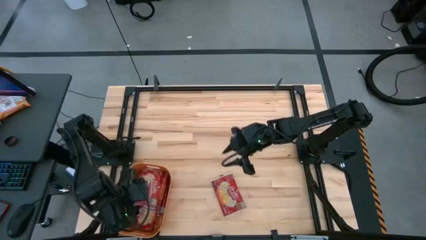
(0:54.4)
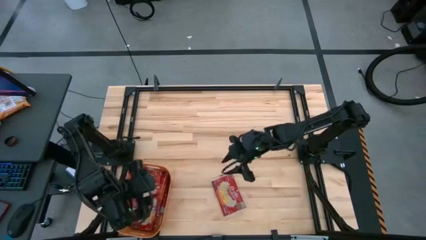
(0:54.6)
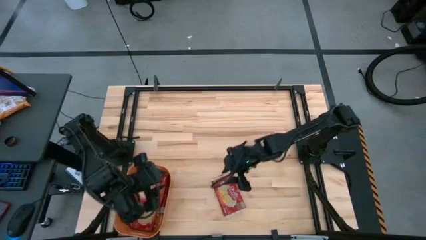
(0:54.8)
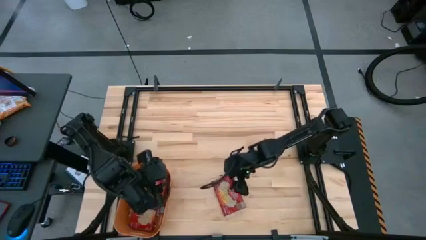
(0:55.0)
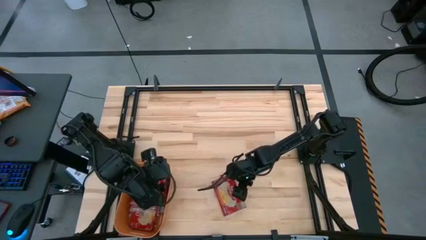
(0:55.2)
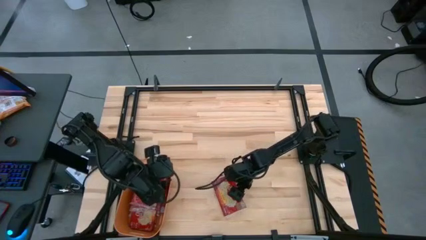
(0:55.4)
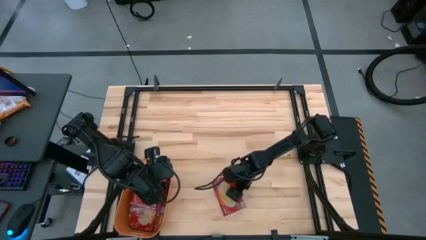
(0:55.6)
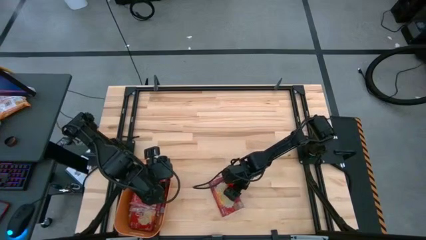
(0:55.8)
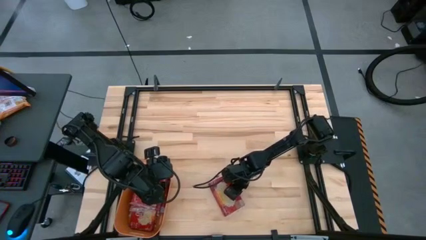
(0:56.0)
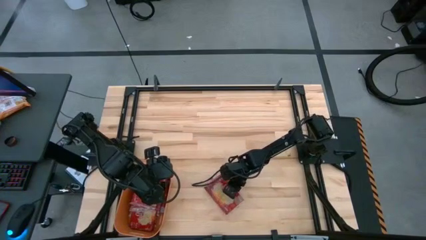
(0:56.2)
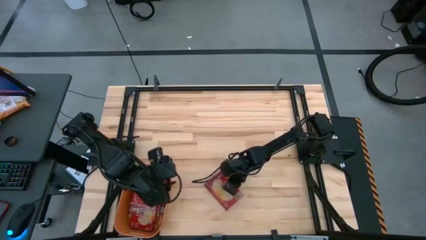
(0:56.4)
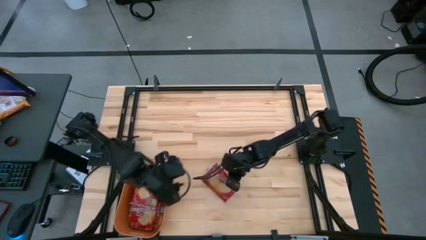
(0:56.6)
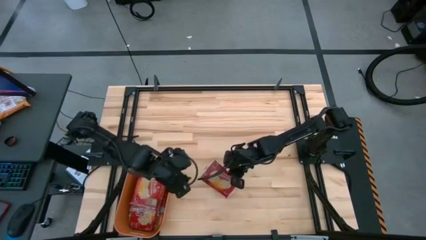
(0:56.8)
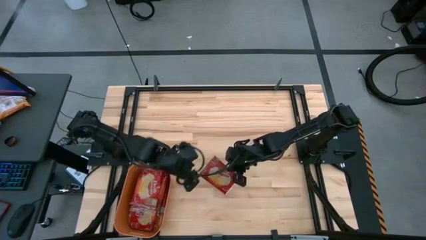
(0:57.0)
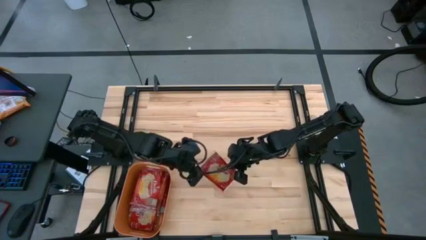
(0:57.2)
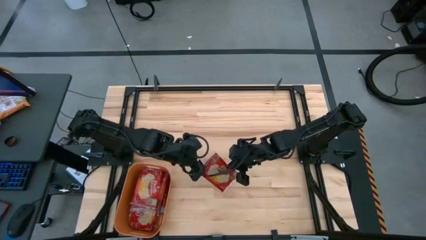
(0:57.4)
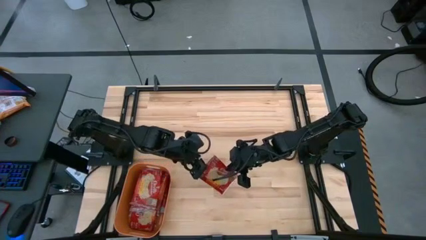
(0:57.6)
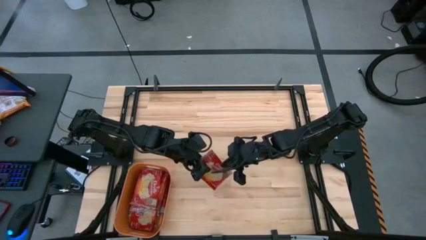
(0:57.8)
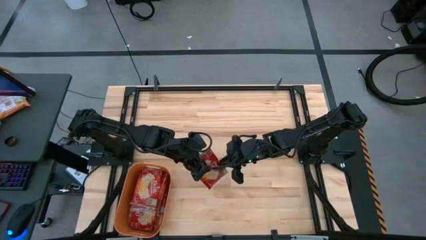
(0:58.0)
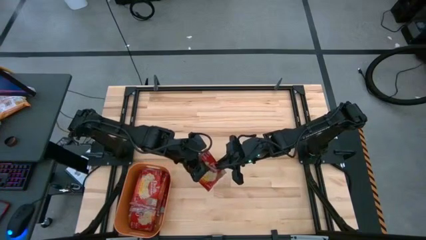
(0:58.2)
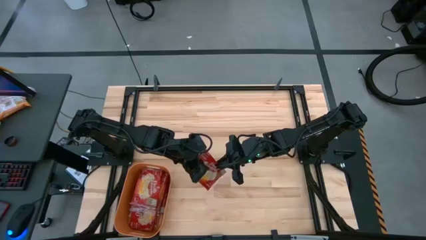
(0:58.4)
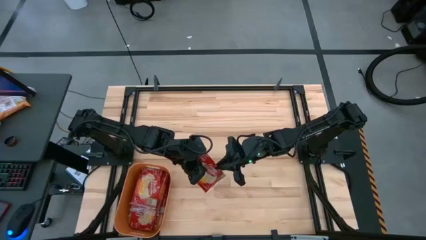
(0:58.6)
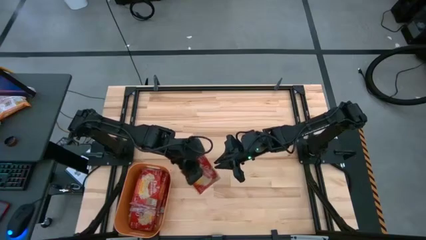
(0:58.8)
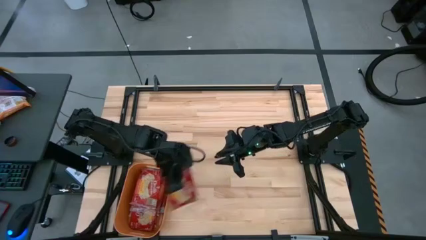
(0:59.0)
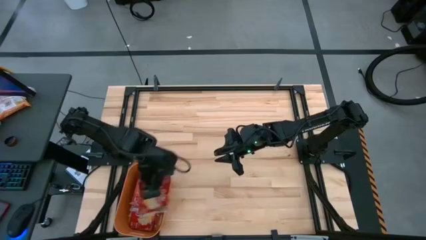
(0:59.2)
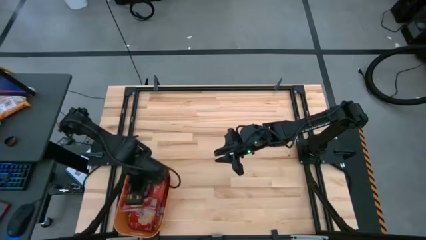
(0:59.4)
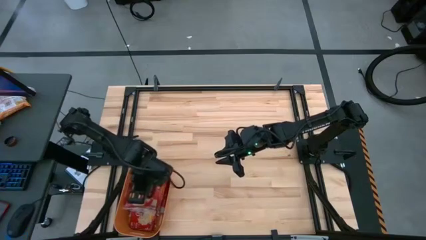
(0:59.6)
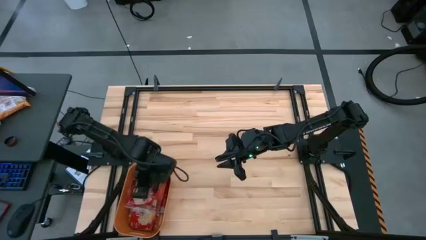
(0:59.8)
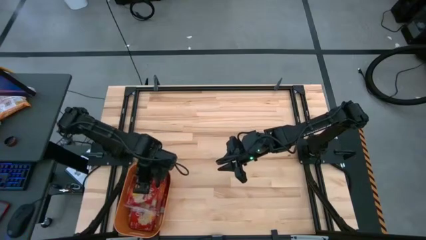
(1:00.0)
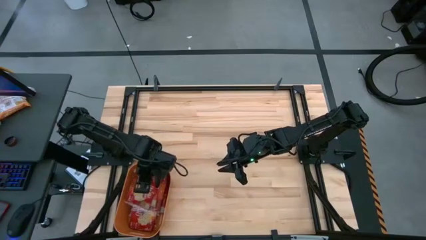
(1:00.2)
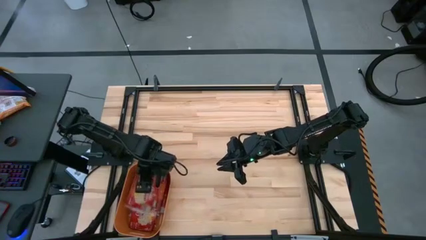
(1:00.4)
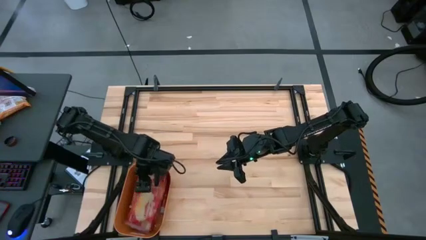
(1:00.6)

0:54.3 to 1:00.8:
Task: Sort popcorn bags into baskets
Put the red popcorn bag into the orange container

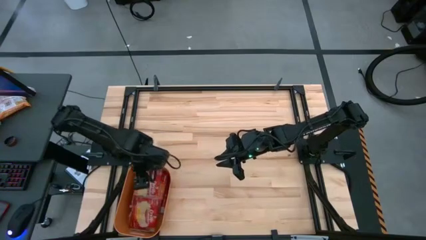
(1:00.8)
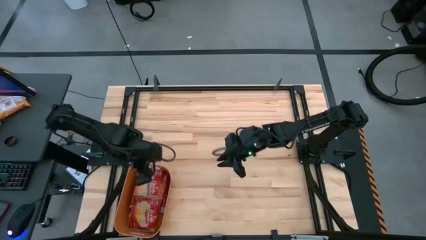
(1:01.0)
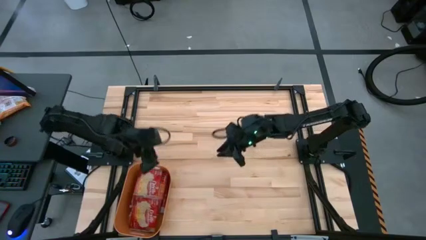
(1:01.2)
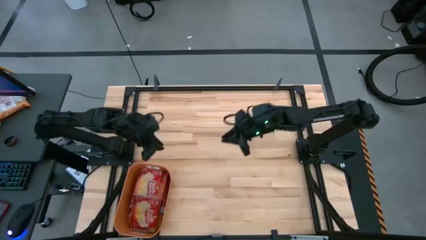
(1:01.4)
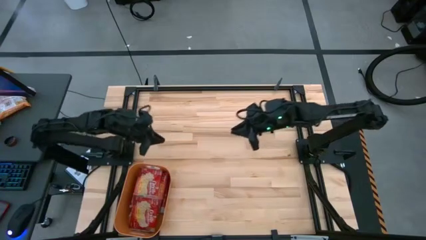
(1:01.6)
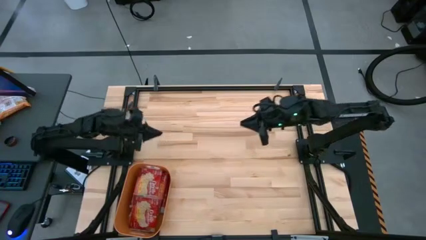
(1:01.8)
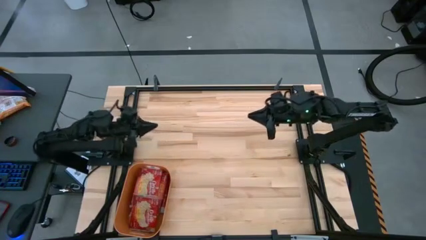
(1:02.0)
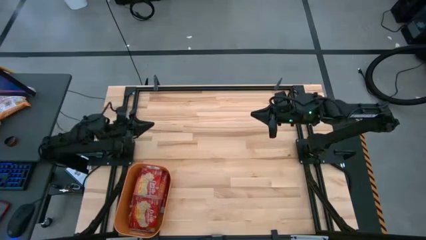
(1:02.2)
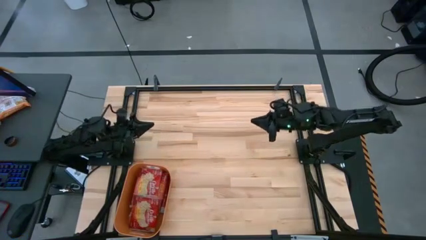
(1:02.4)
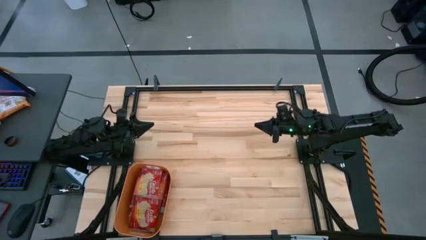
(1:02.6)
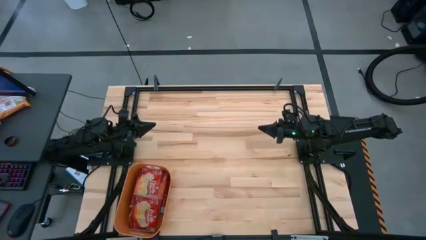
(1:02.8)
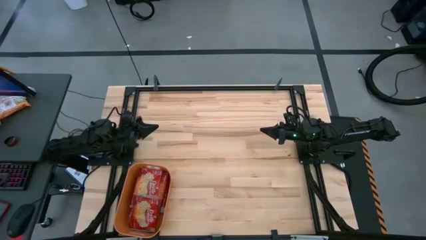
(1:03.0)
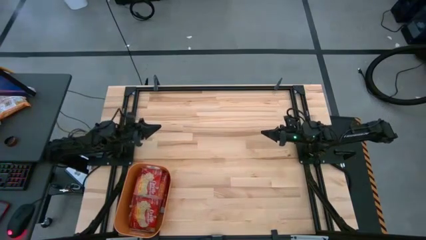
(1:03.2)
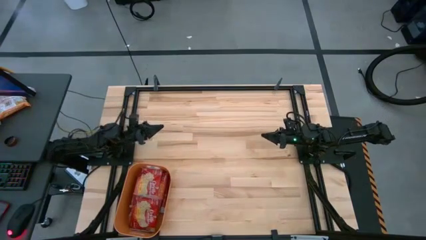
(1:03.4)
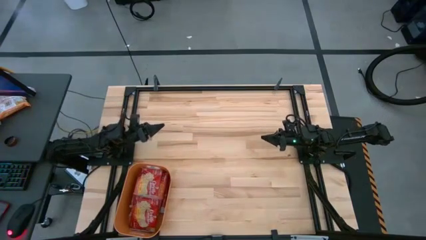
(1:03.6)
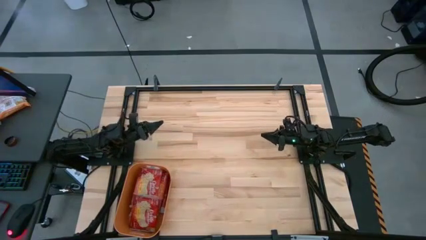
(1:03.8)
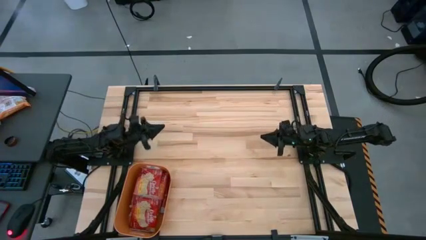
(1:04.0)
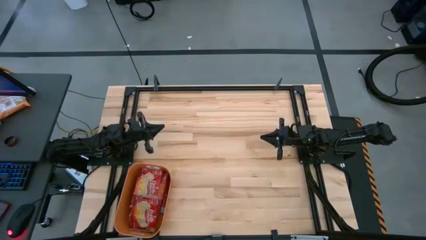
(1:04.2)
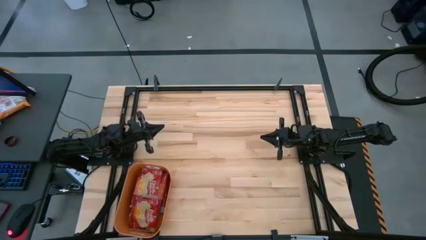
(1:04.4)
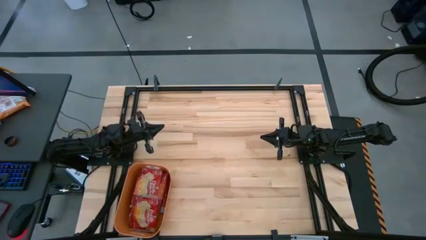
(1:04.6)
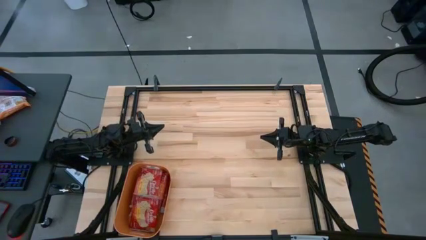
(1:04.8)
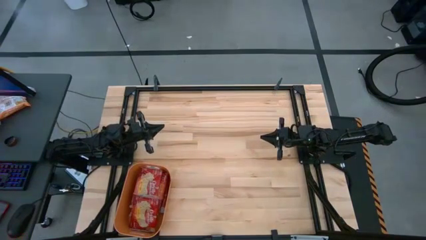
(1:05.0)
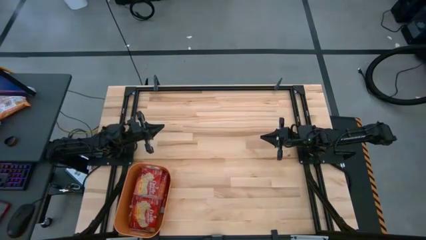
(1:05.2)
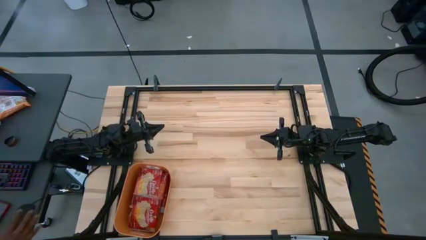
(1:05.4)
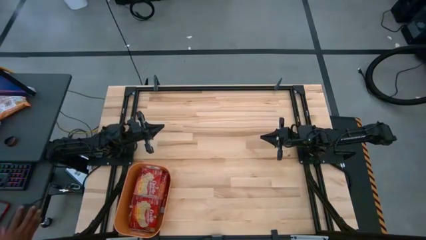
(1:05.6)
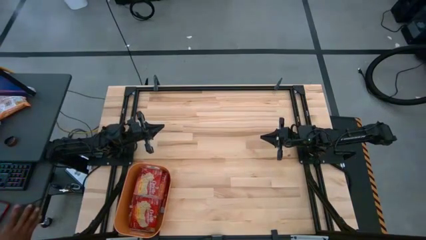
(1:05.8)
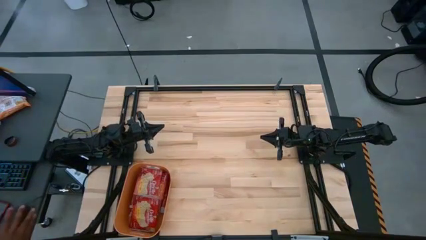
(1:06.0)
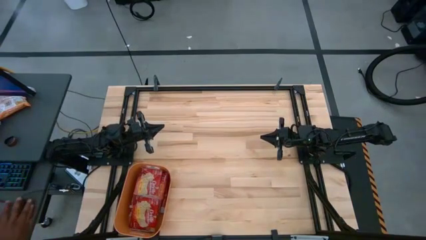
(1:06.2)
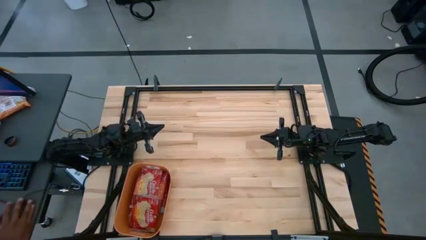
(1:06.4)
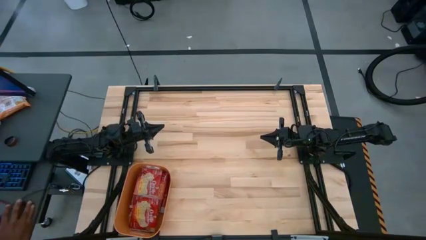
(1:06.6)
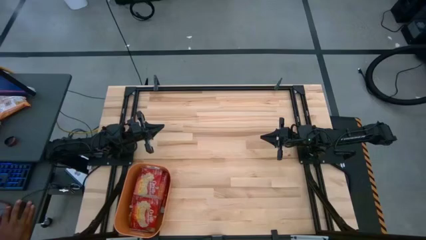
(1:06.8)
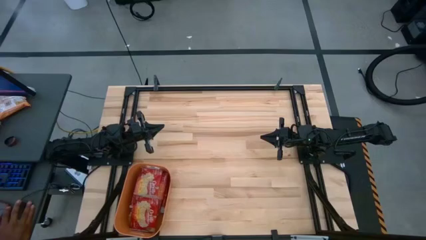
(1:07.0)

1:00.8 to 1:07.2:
Return to Home Position
